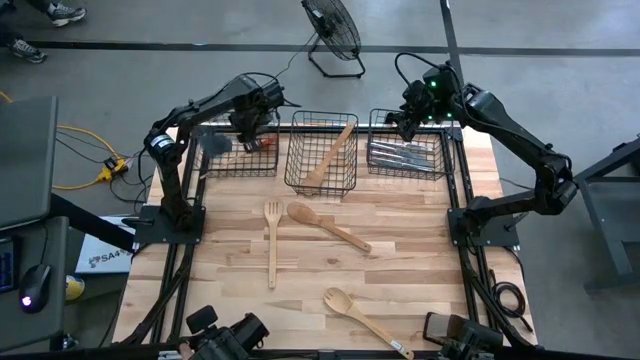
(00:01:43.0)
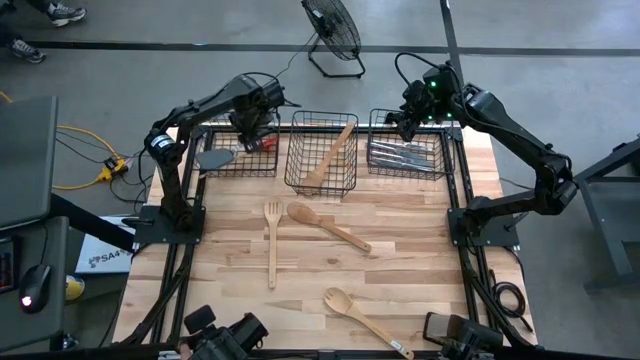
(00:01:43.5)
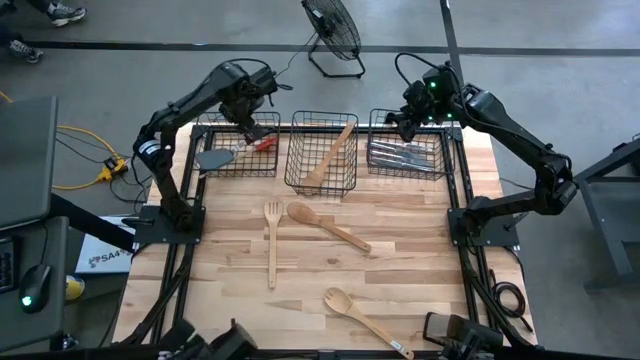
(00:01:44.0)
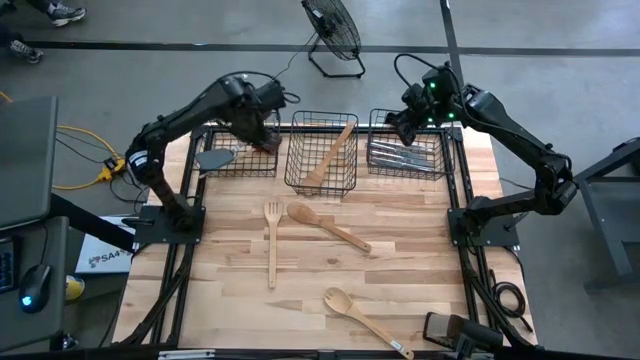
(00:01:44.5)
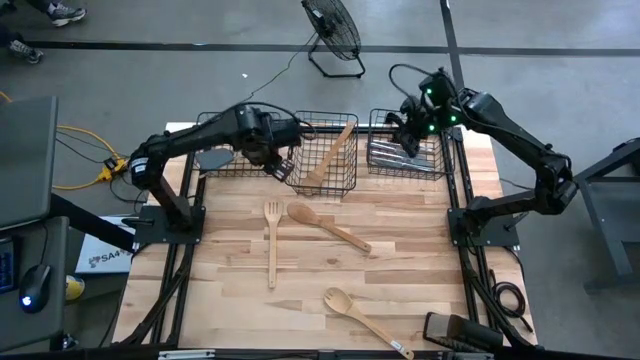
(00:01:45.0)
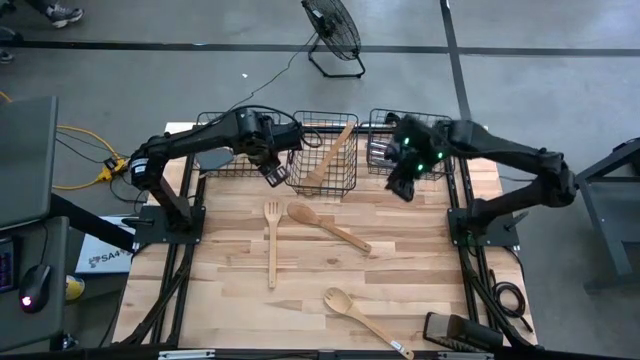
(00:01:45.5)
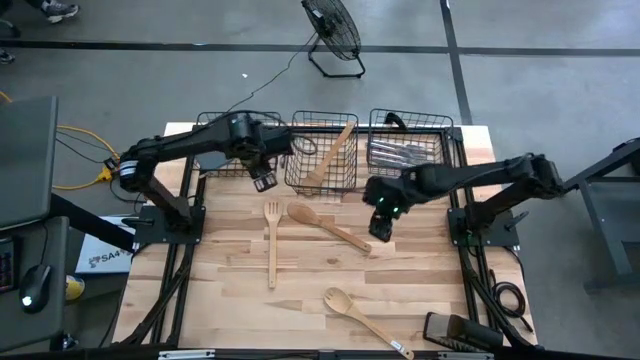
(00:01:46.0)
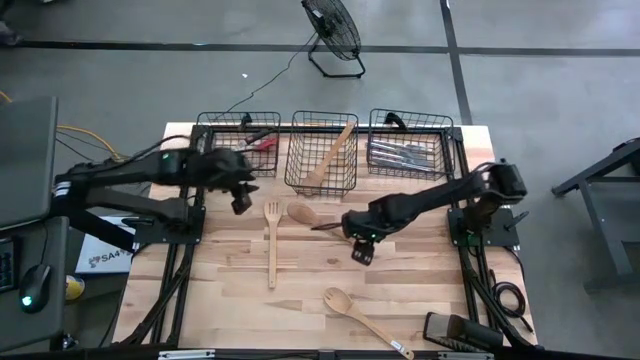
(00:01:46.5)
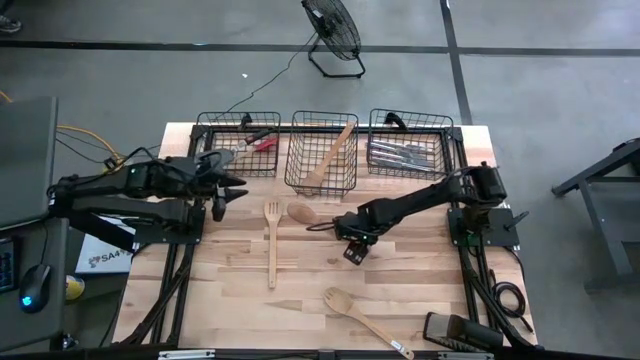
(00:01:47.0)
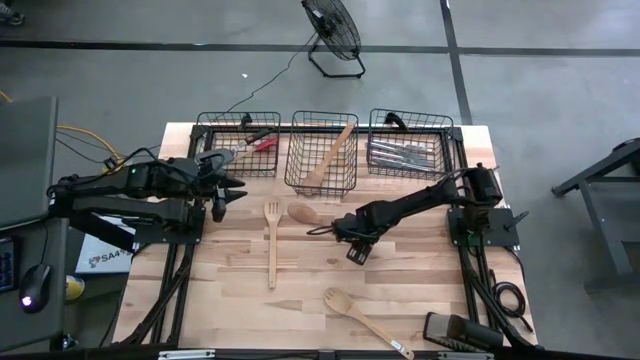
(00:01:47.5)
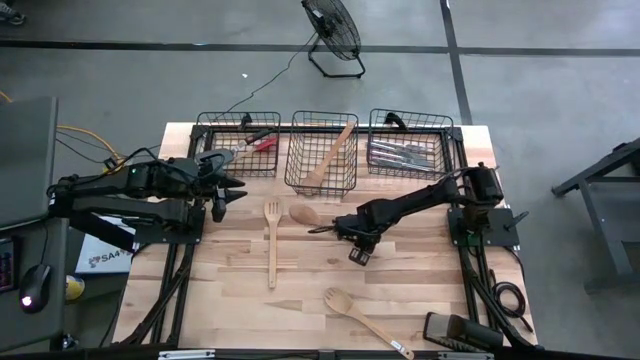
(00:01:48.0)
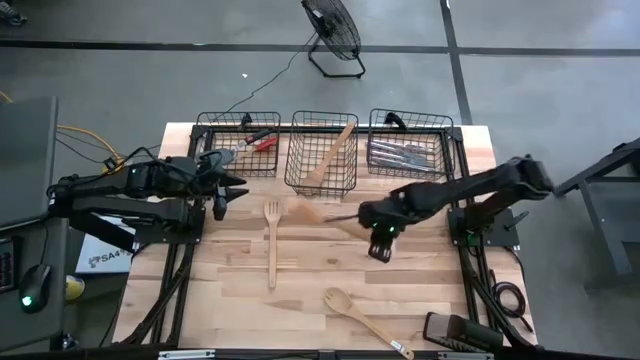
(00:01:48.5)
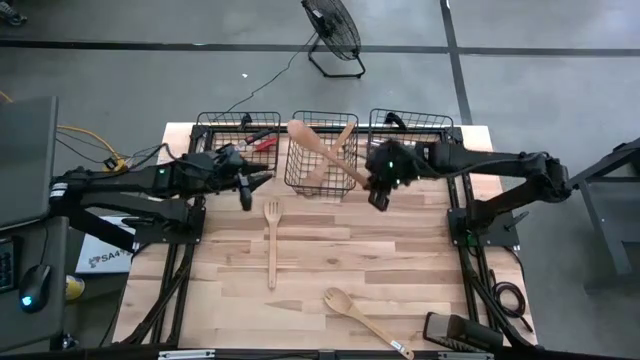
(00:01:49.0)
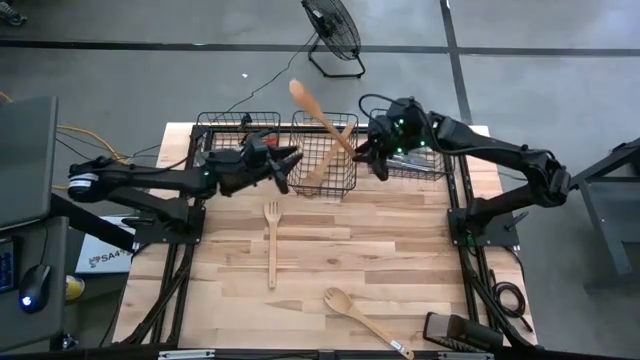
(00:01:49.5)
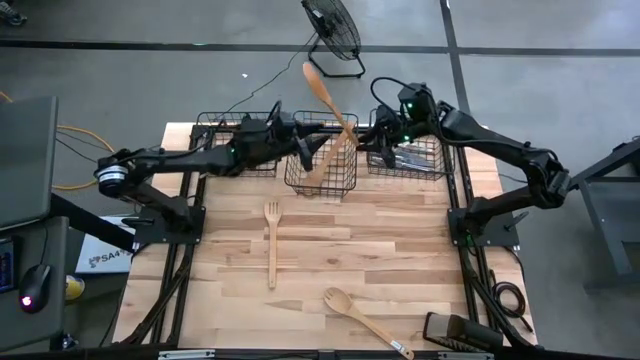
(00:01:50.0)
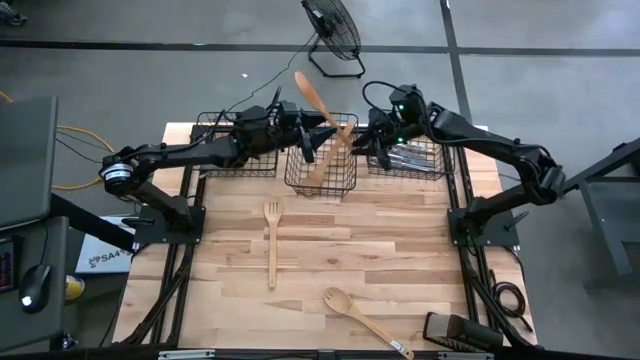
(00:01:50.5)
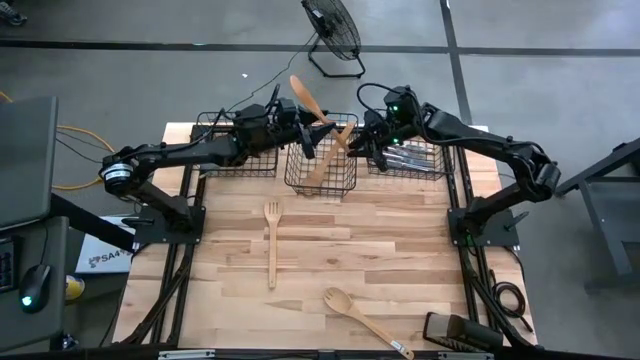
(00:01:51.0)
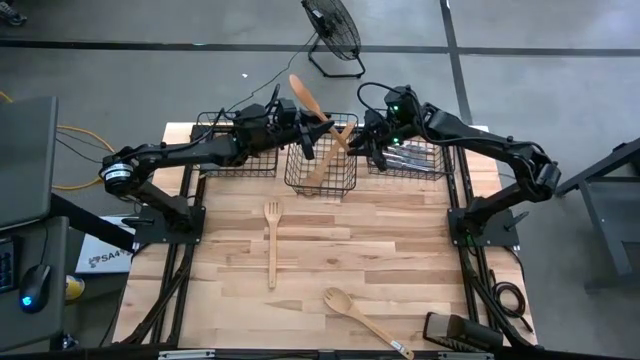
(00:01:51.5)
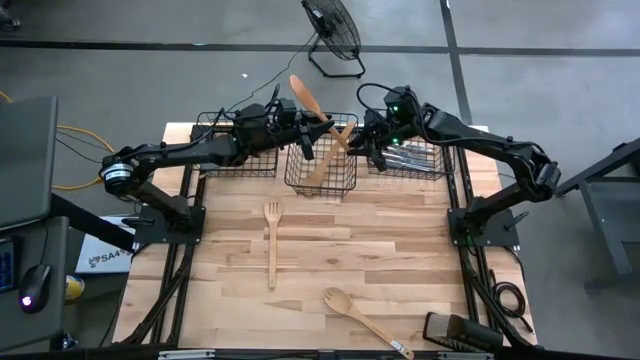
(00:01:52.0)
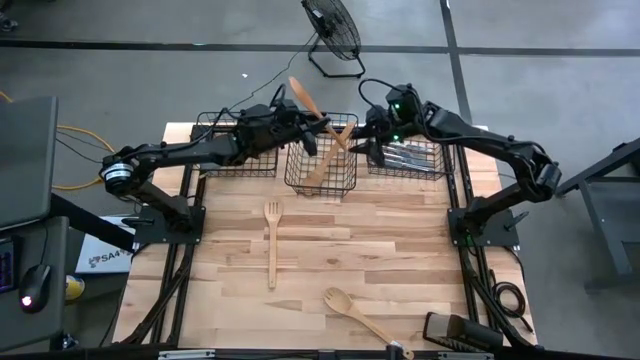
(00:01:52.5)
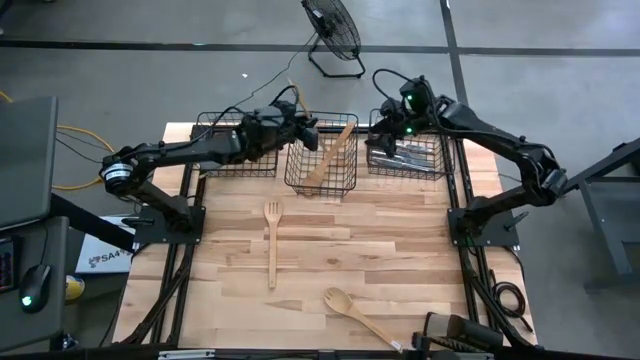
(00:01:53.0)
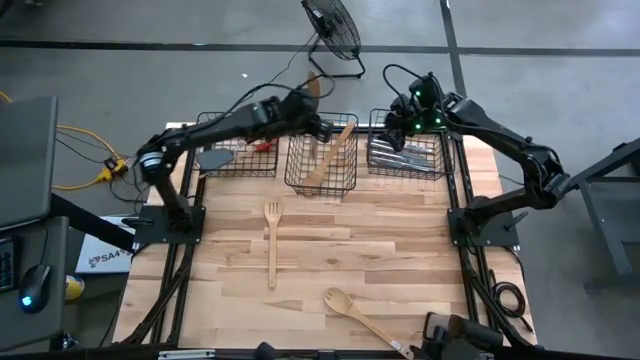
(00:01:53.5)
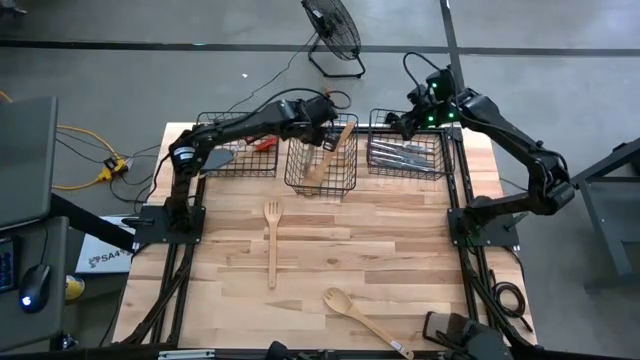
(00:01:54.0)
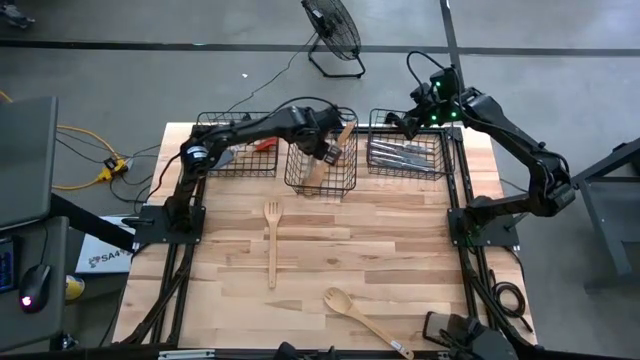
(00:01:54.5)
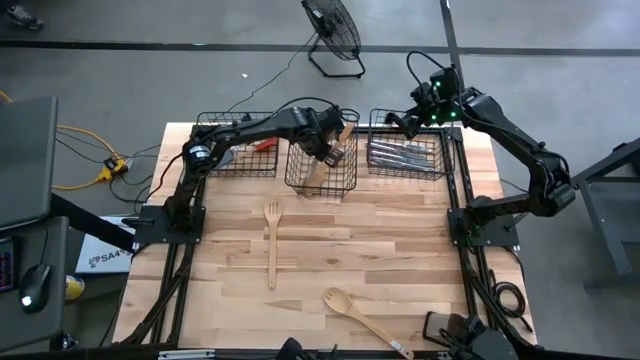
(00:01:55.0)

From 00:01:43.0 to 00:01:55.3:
Task: Pick & Place Kitchen Items
Put the brown serving spoon into the middle wire basket

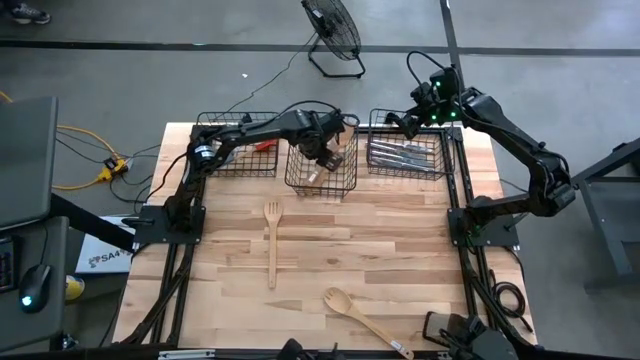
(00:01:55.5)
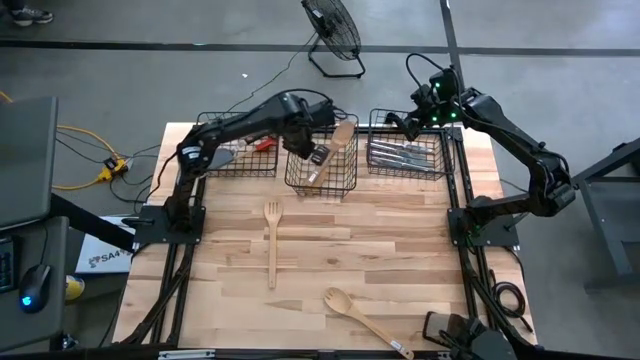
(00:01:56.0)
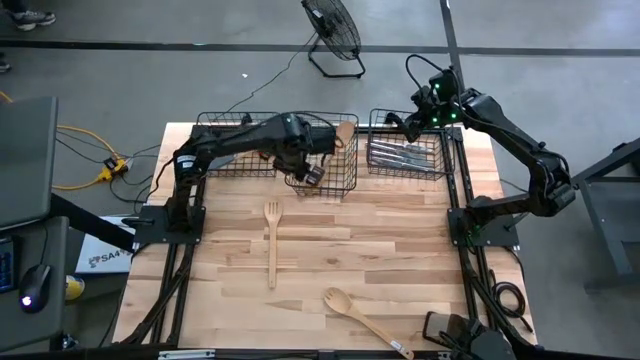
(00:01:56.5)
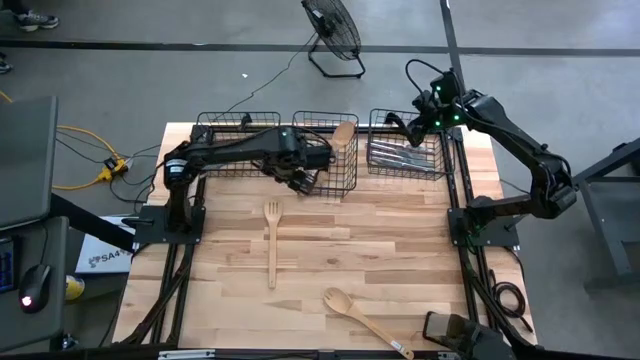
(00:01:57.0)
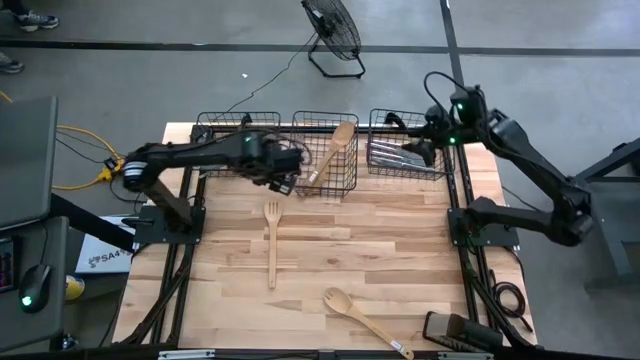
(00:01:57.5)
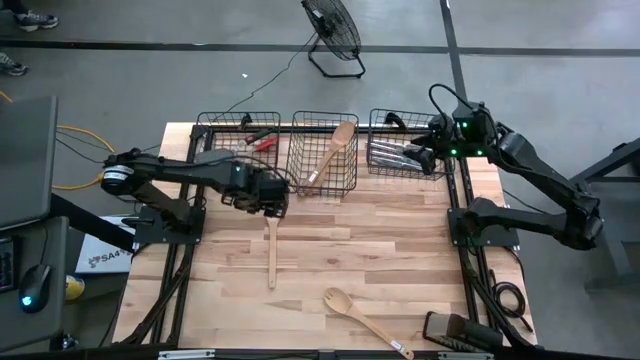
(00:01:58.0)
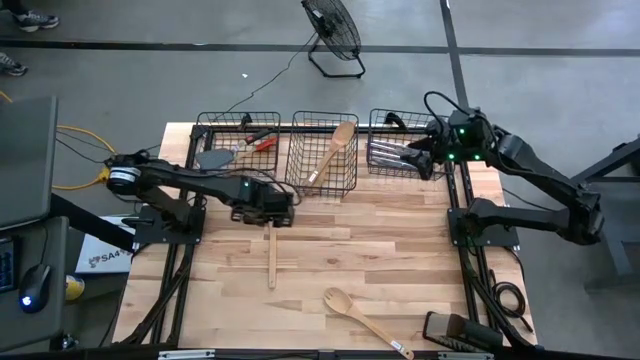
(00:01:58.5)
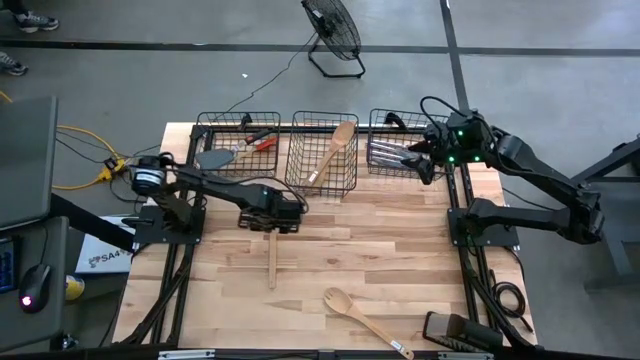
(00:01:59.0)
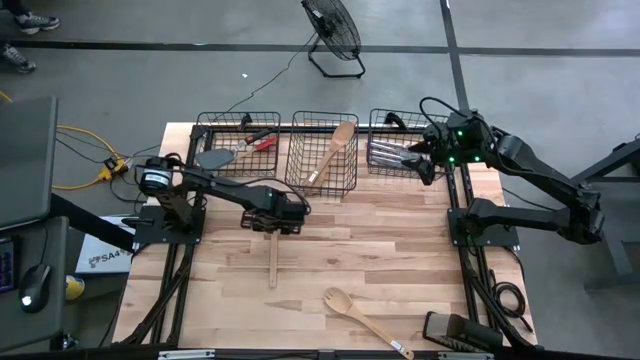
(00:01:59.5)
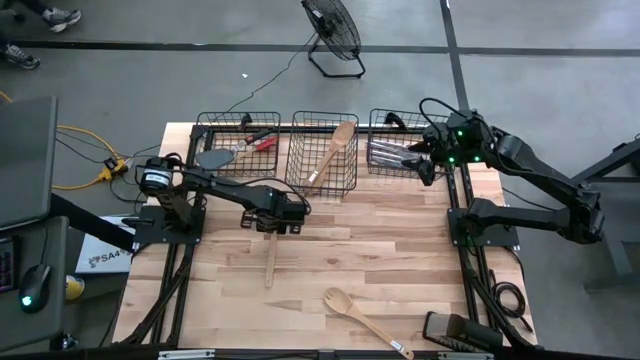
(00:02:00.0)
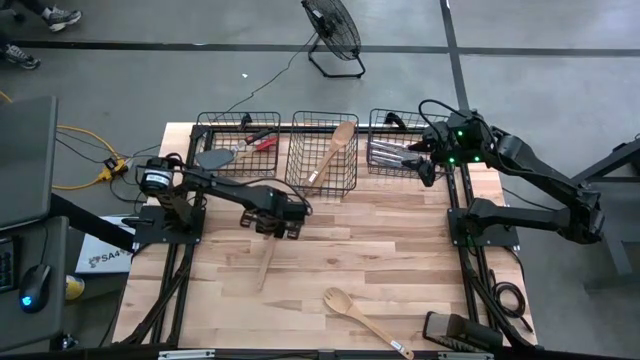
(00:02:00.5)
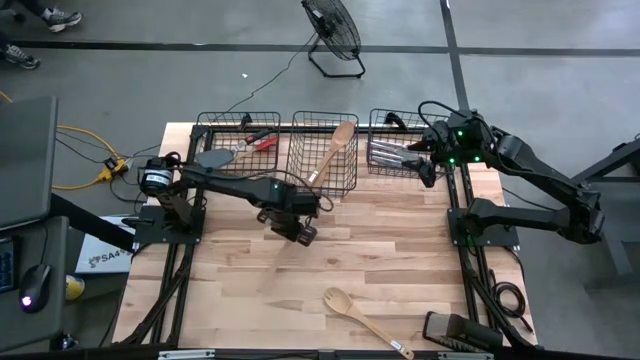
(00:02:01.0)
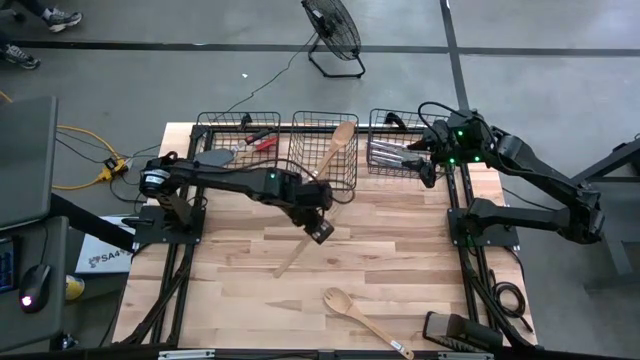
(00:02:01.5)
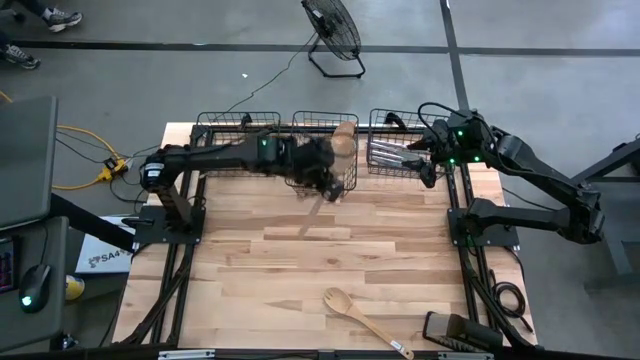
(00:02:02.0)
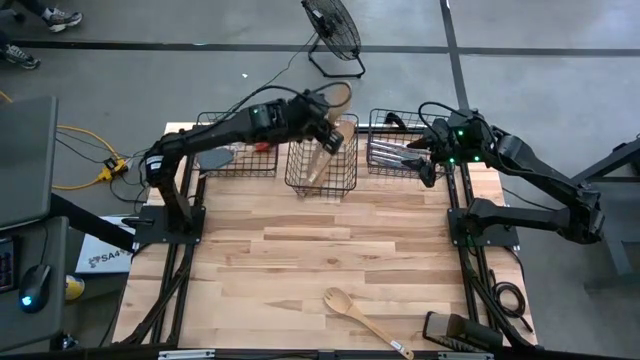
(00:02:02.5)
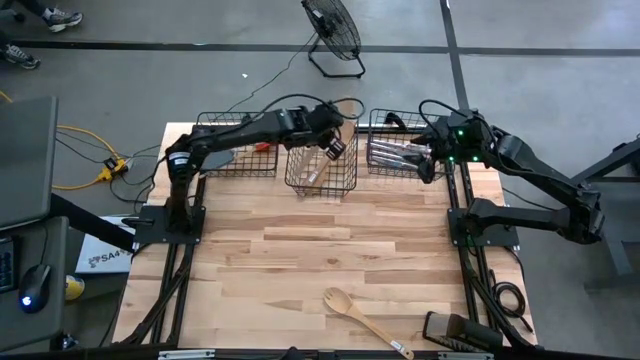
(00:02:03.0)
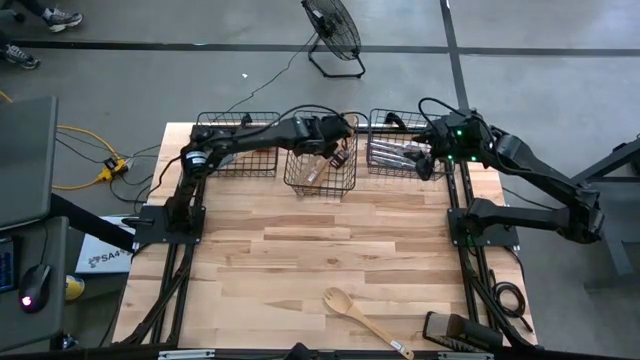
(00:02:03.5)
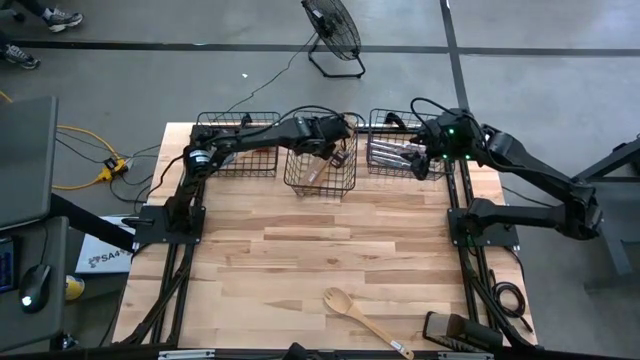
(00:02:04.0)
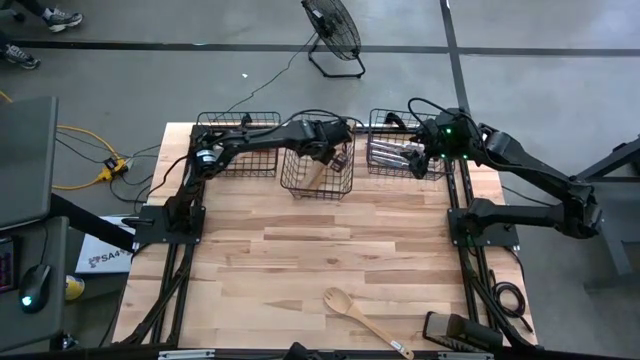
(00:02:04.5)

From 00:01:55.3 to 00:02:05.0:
Put the brown serving spoon into the middle wire basket
